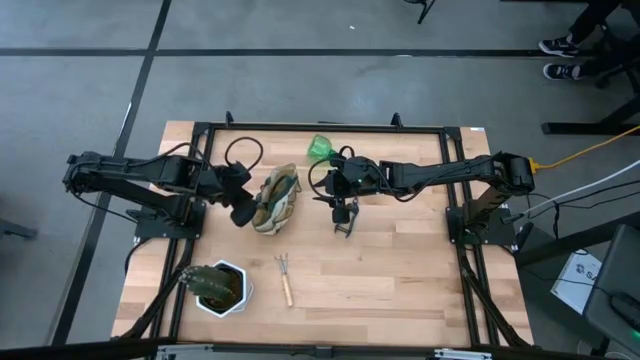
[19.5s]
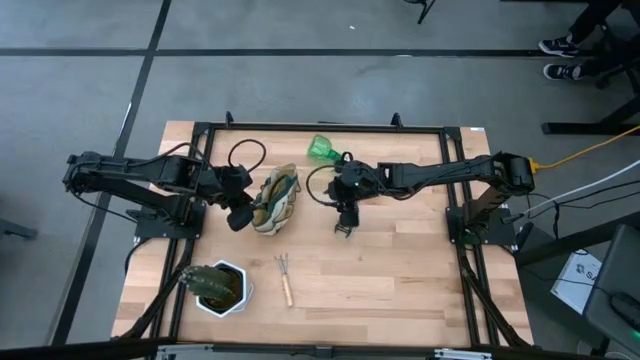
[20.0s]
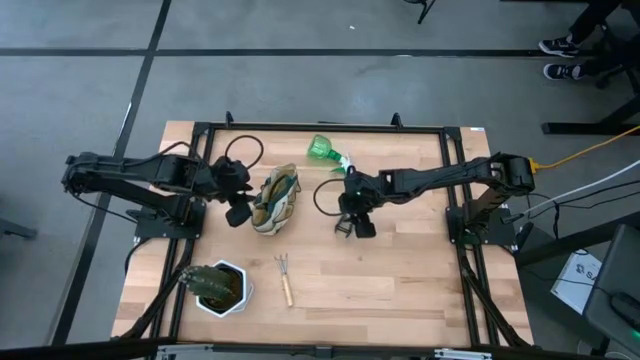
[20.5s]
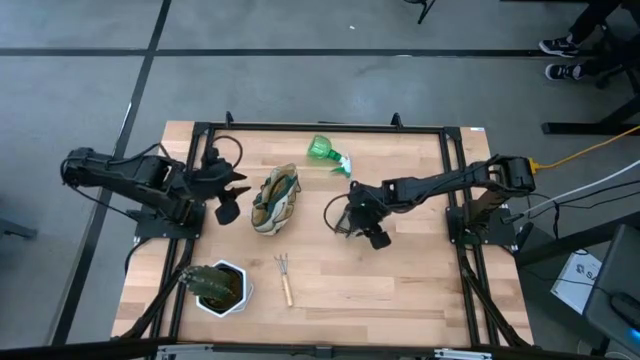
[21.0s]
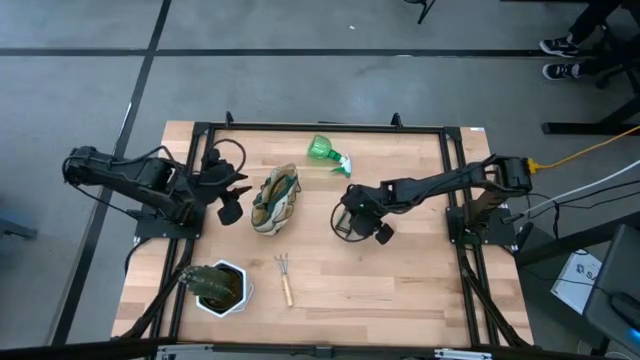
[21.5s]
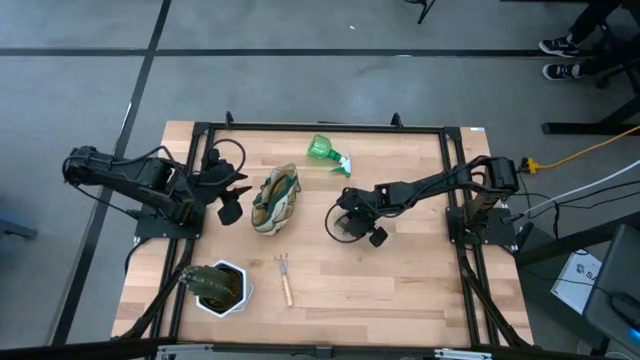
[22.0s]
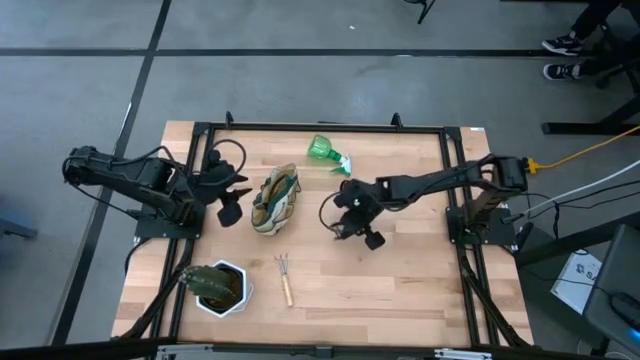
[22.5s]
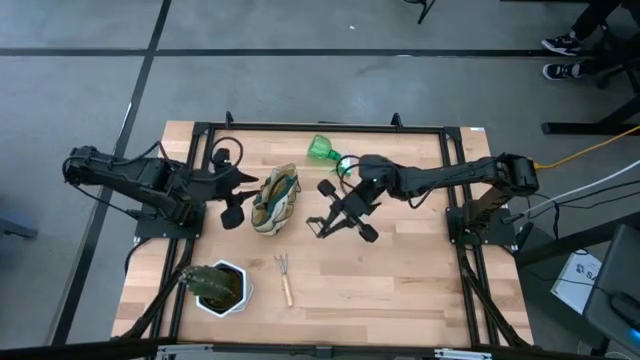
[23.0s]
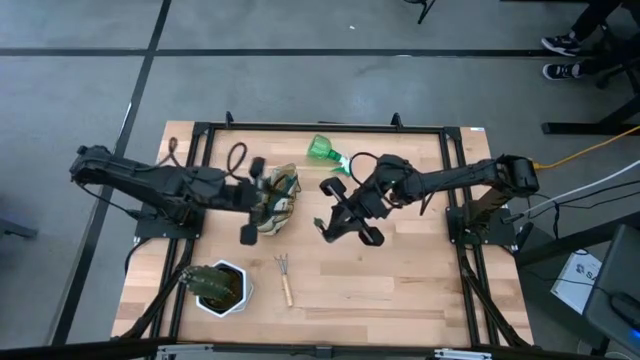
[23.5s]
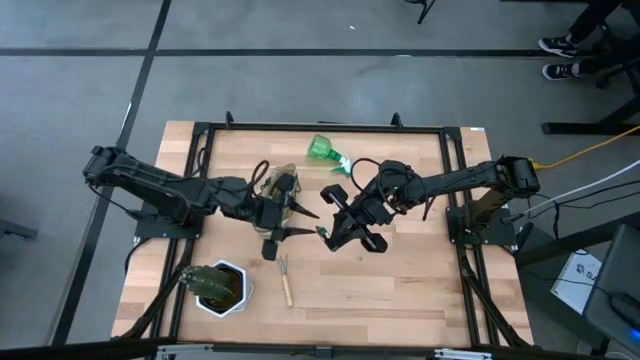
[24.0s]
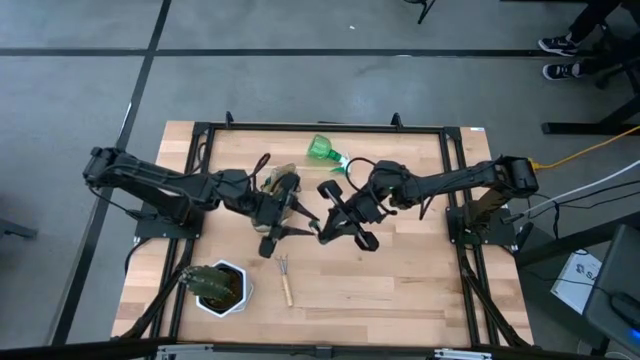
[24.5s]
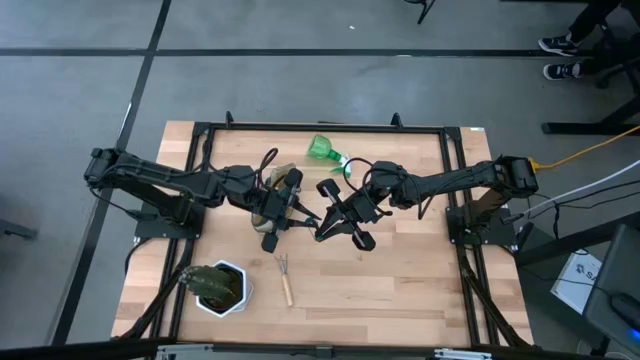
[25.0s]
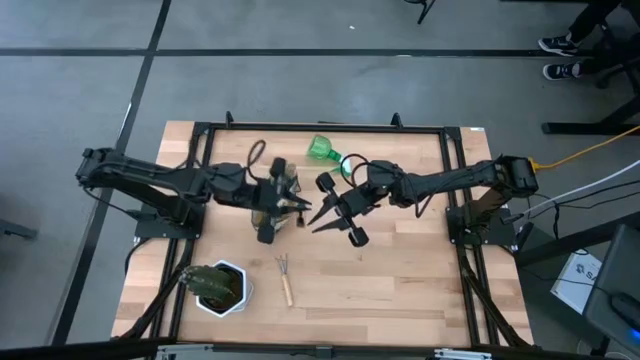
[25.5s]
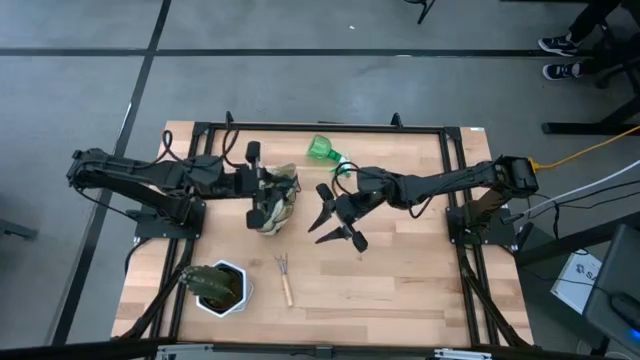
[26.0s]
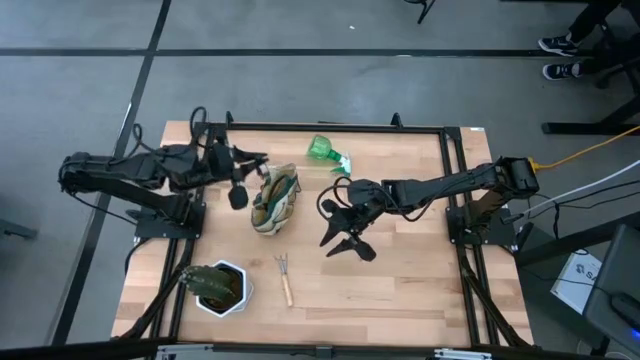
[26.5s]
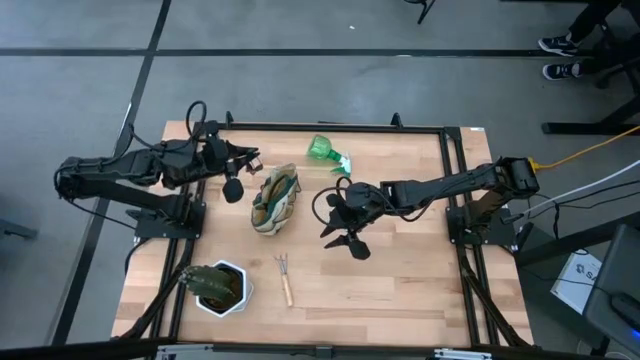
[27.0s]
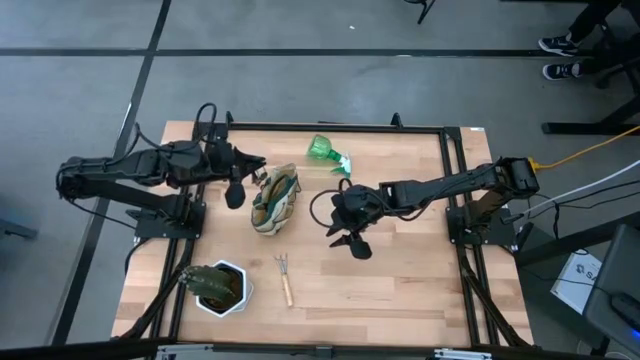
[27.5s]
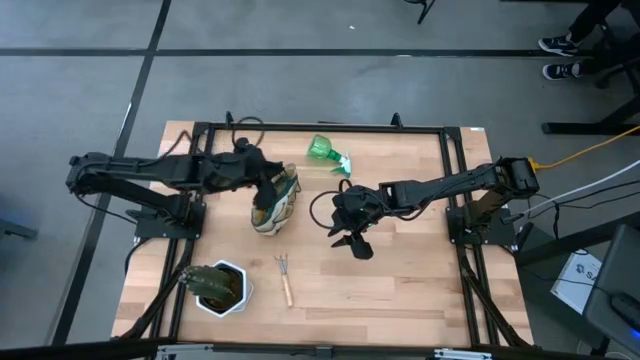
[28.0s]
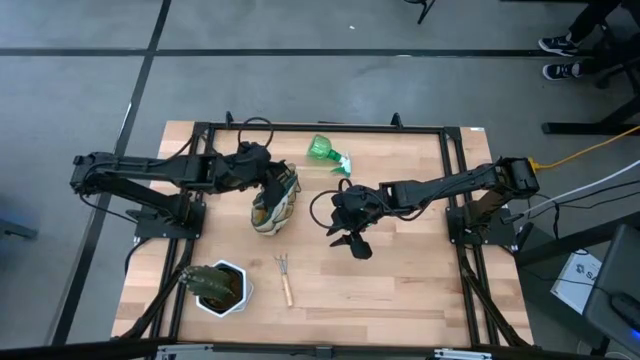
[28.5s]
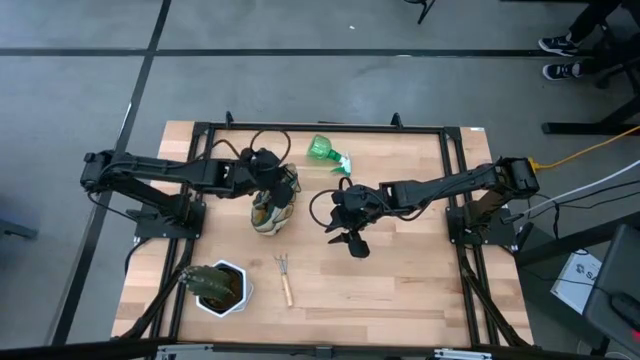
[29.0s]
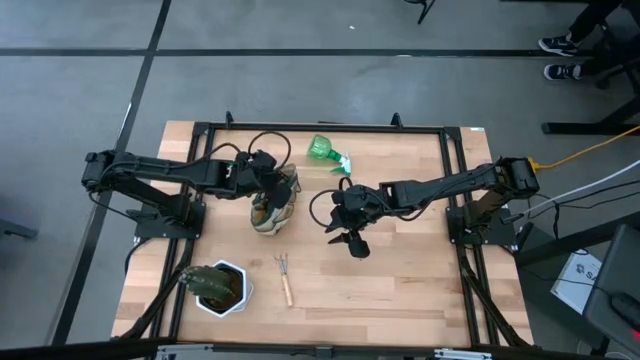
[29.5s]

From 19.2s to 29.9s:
Task: Pick & Place Garden tools in Gardening bag
Put the green shear scissors into the white gardening bag

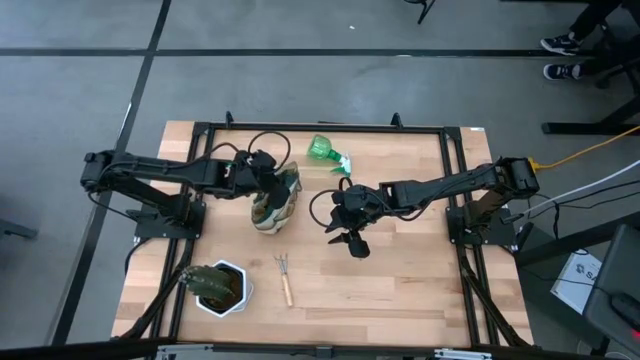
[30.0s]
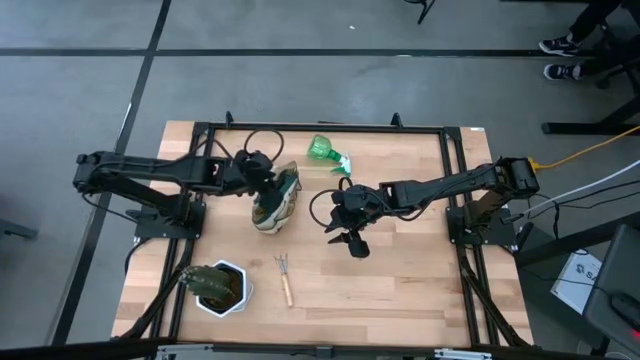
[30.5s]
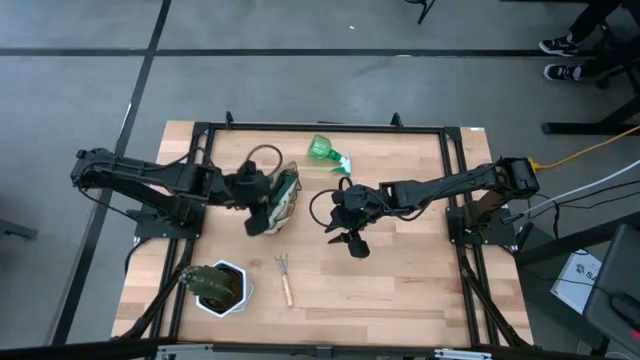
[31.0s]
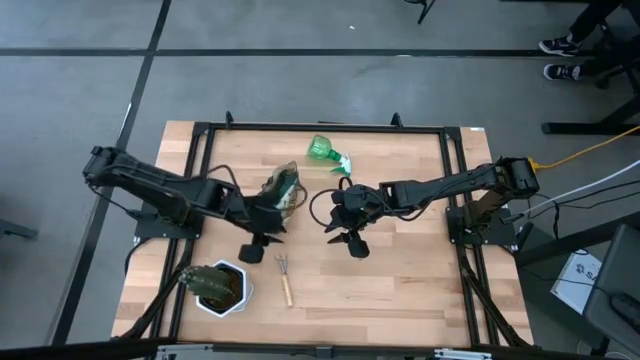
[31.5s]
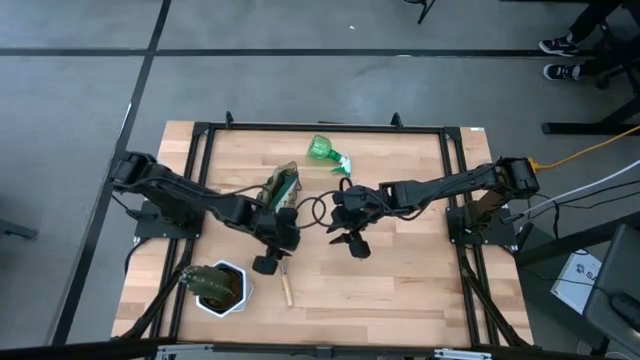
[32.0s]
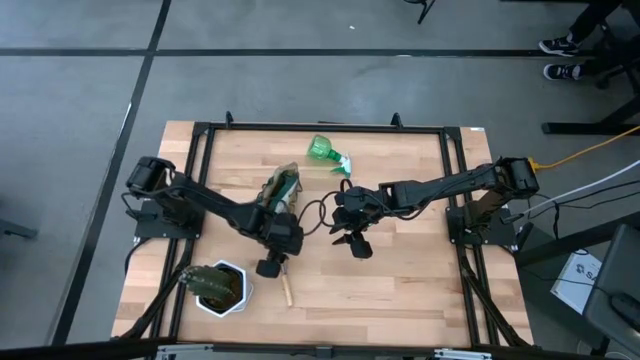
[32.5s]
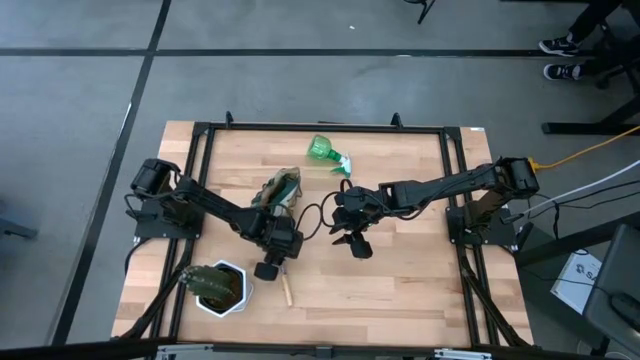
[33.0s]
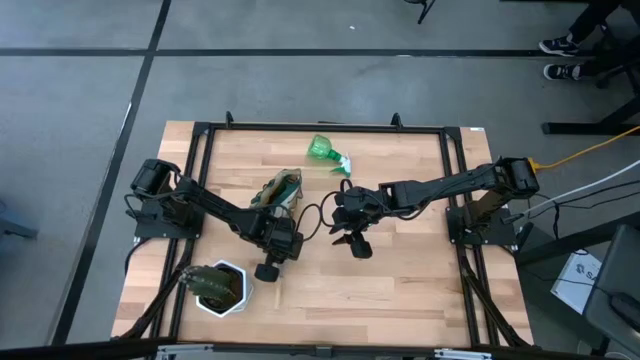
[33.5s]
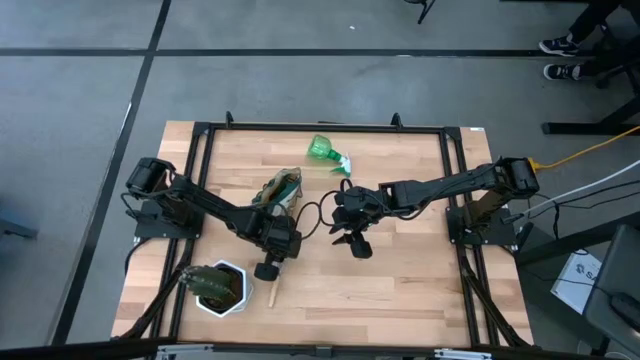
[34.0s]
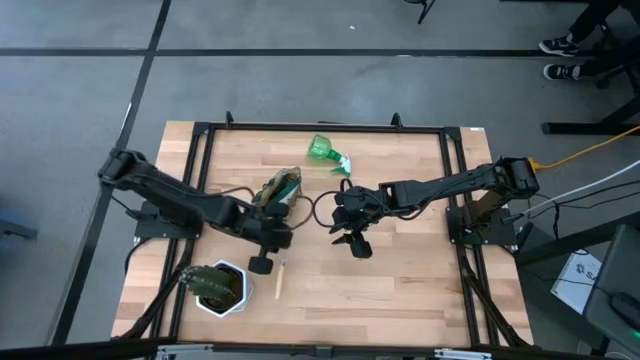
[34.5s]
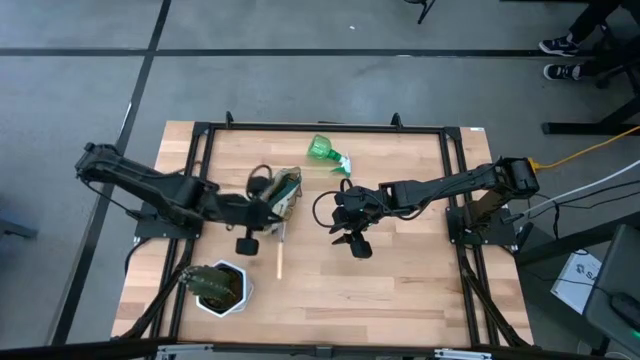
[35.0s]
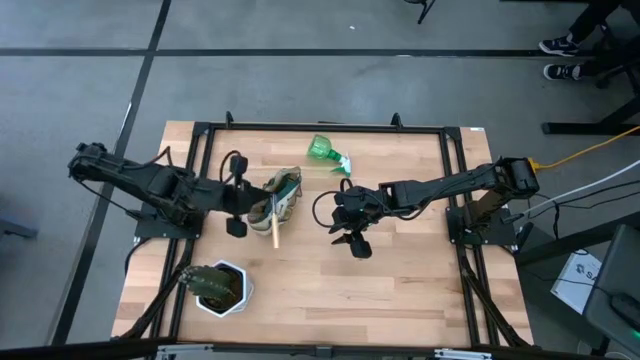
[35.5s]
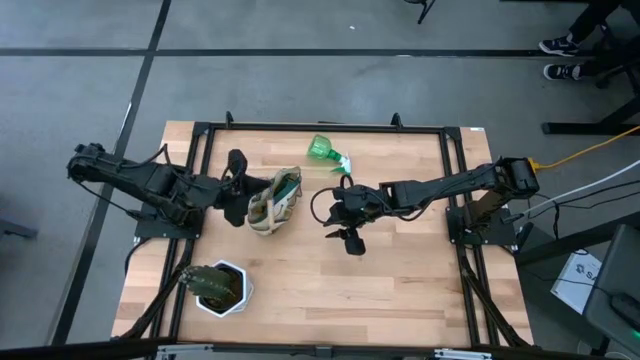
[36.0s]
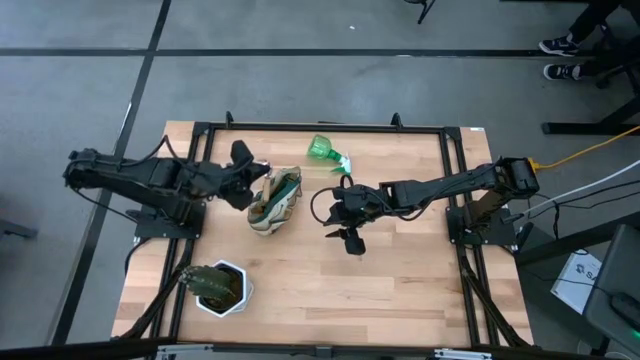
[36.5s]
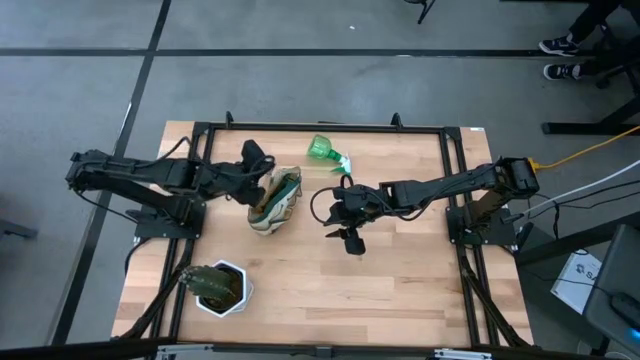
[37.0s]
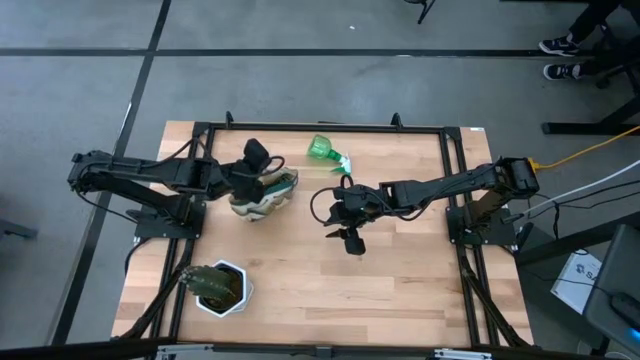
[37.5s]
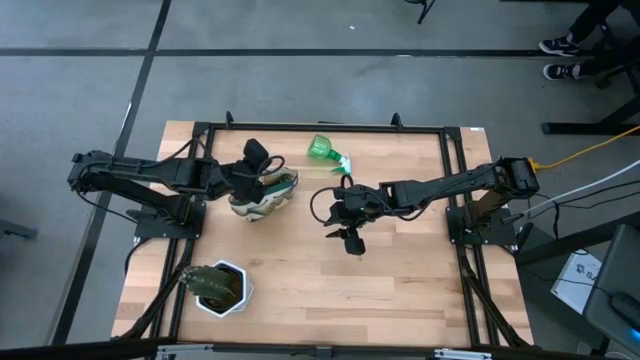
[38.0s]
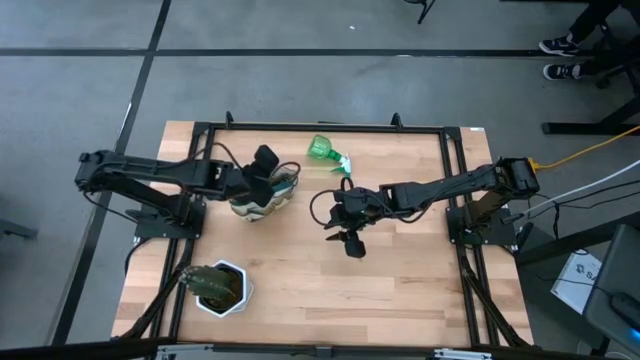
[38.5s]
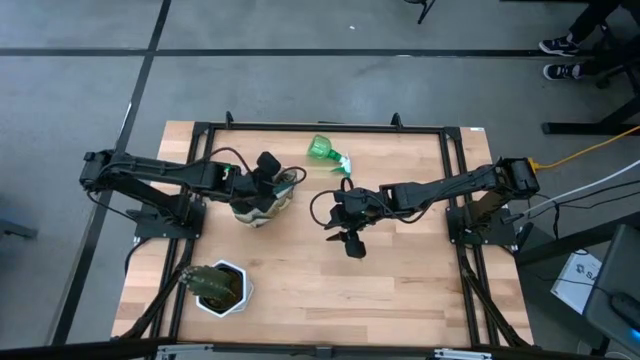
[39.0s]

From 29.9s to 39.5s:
Put the brown hand rake into the white gardening bag

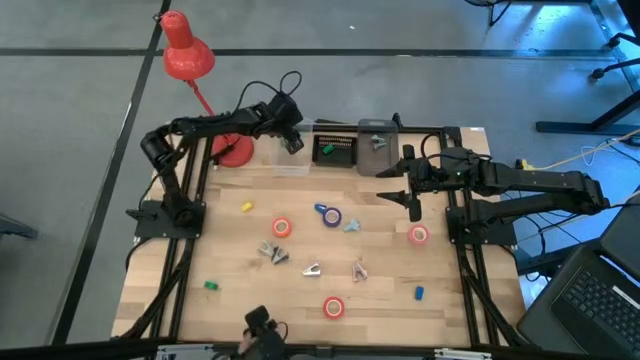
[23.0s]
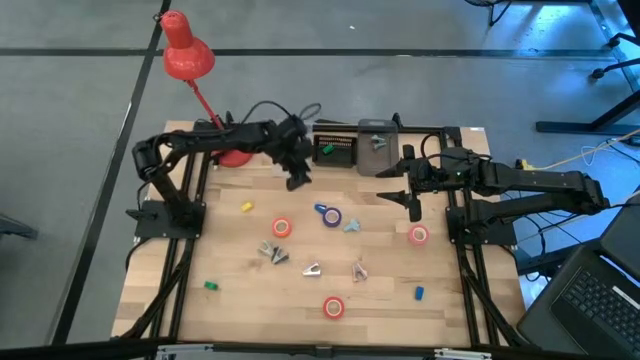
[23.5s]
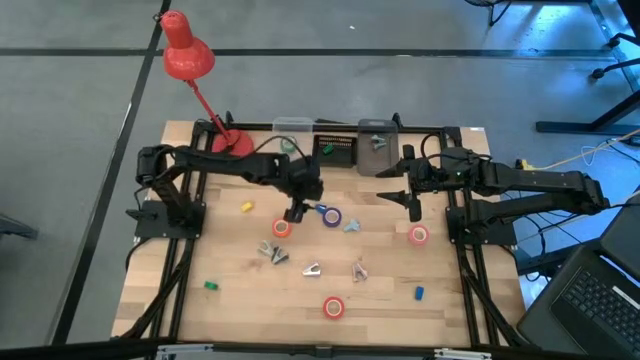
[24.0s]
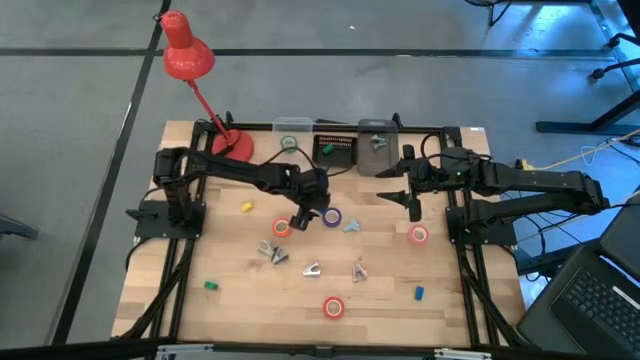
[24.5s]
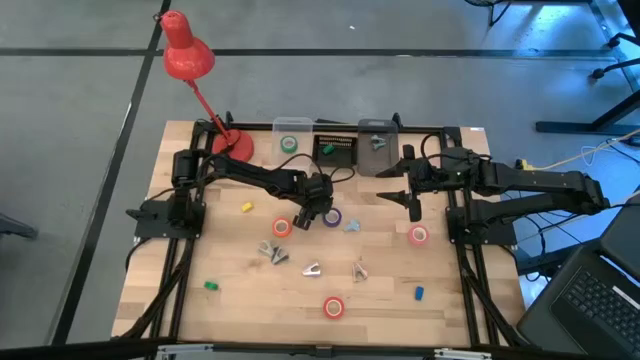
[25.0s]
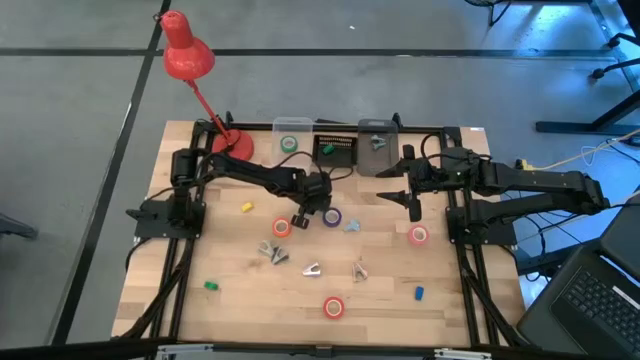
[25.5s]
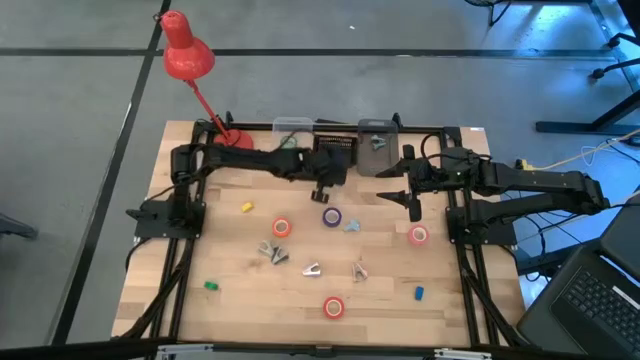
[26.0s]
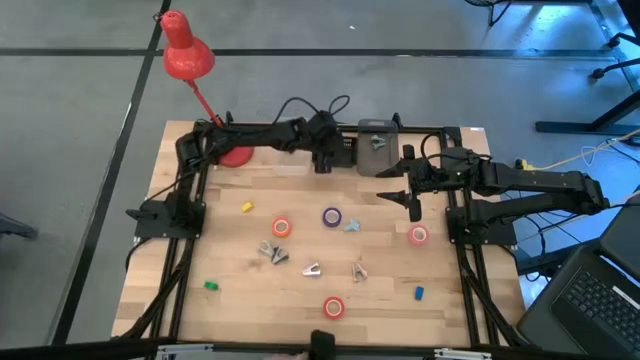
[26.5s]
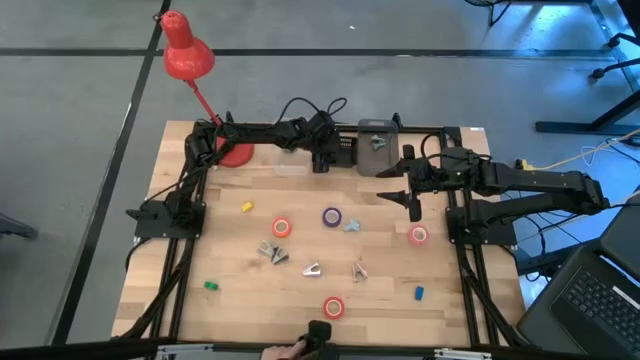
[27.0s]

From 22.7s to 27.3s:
Task: Pick and place Stapler, Stapler remover, tape
Put the top blue stapler into the left black bin
